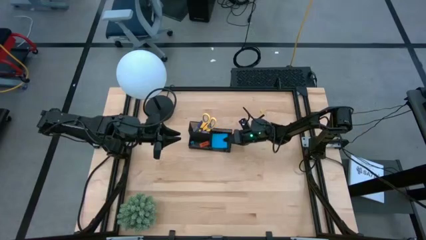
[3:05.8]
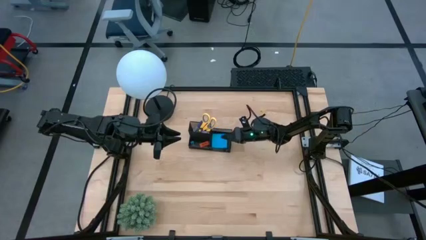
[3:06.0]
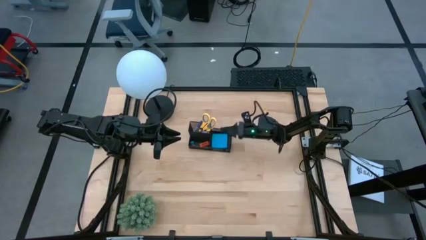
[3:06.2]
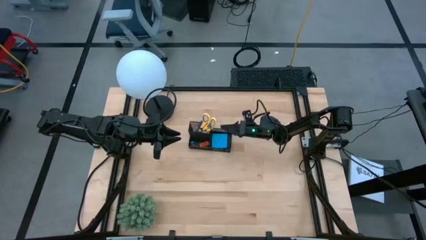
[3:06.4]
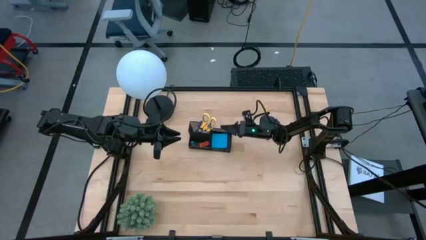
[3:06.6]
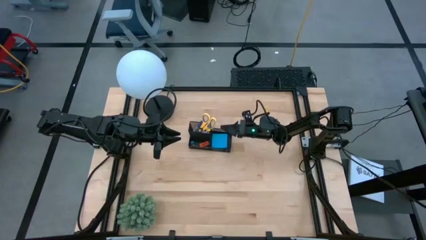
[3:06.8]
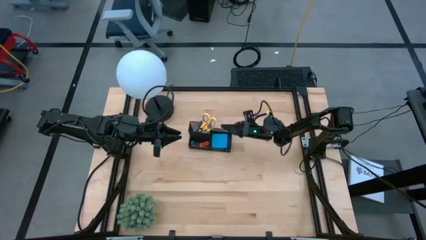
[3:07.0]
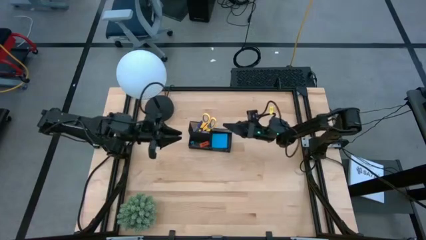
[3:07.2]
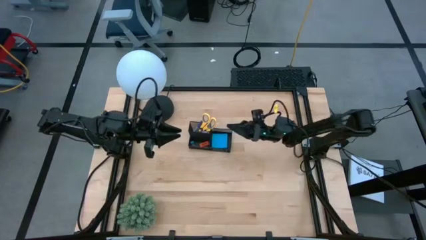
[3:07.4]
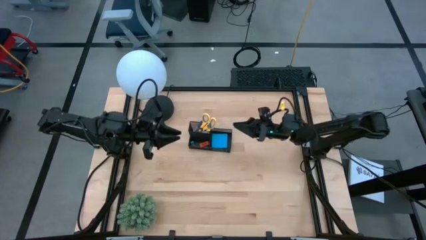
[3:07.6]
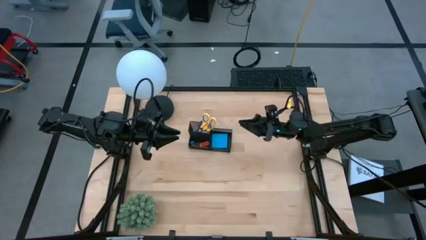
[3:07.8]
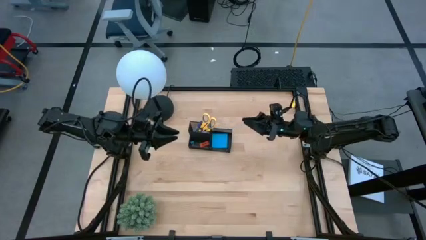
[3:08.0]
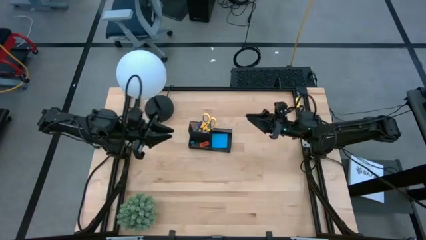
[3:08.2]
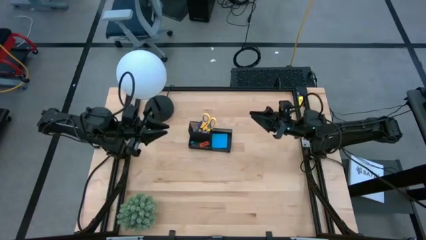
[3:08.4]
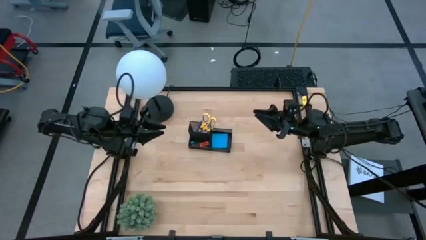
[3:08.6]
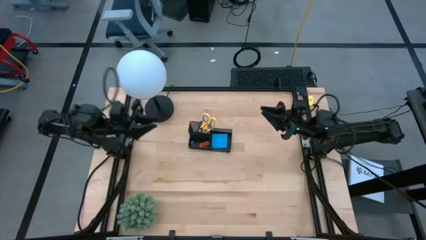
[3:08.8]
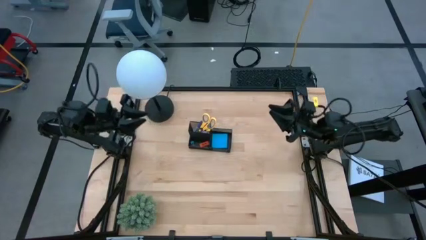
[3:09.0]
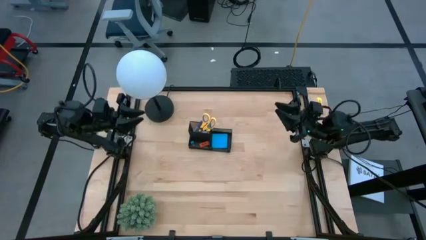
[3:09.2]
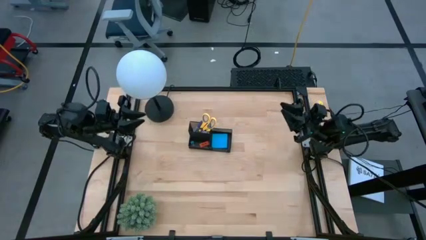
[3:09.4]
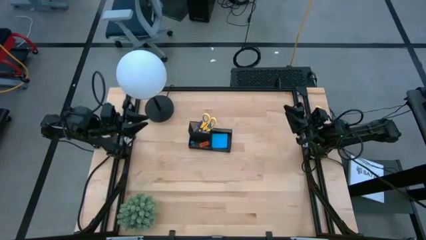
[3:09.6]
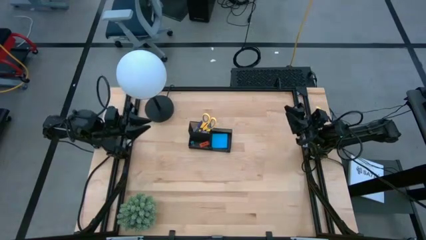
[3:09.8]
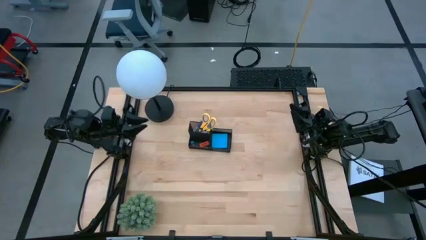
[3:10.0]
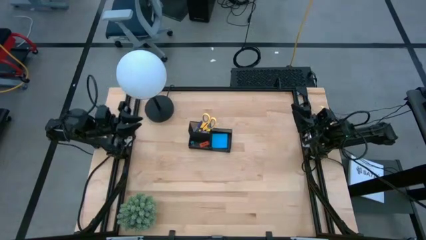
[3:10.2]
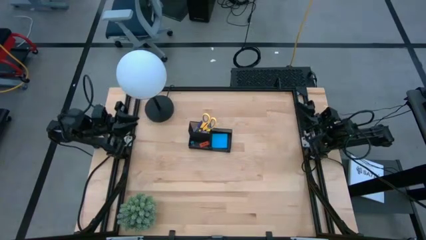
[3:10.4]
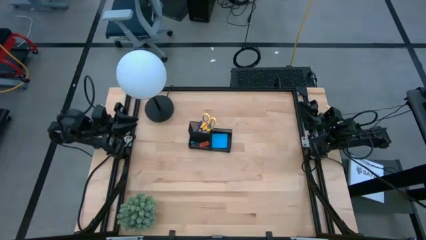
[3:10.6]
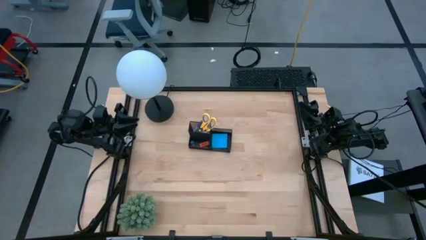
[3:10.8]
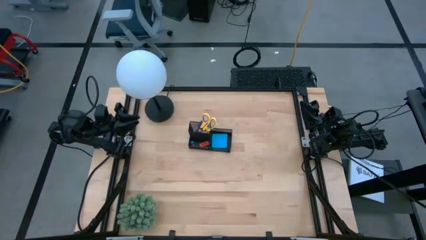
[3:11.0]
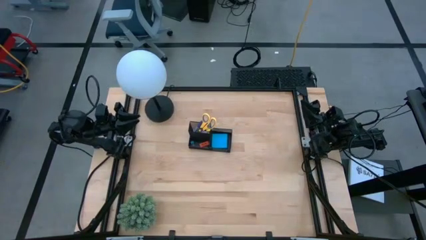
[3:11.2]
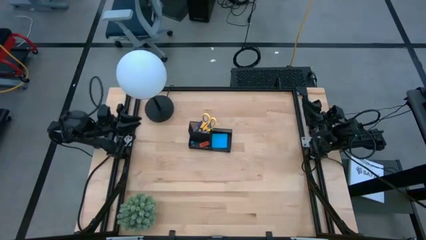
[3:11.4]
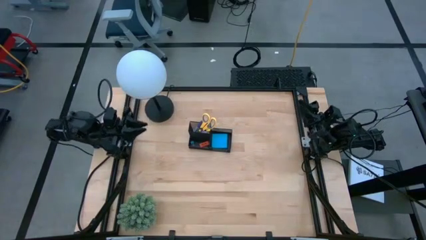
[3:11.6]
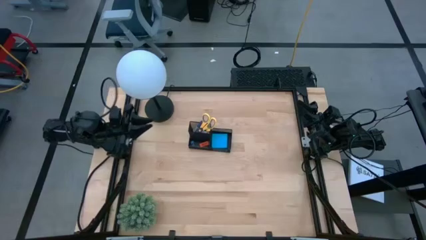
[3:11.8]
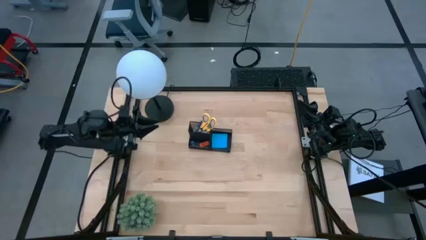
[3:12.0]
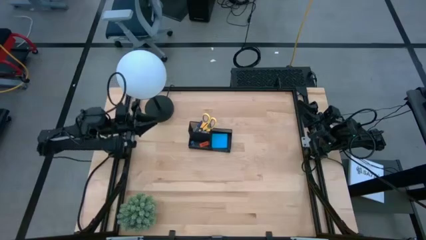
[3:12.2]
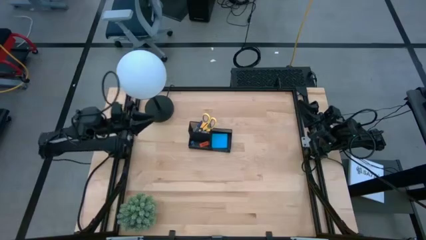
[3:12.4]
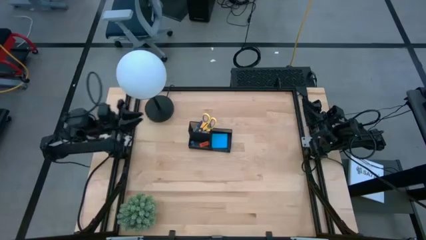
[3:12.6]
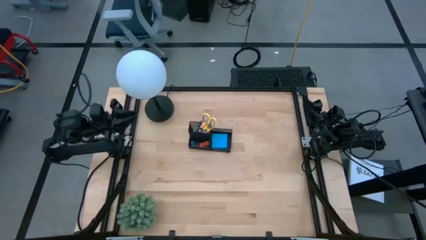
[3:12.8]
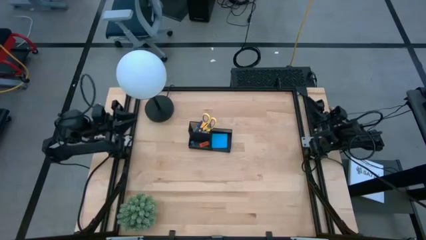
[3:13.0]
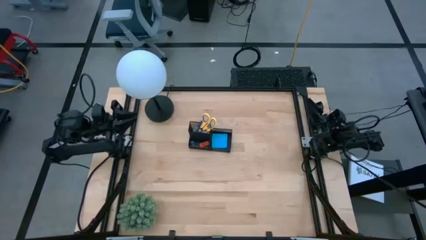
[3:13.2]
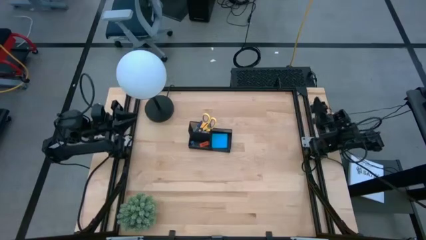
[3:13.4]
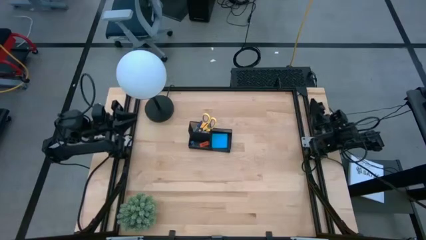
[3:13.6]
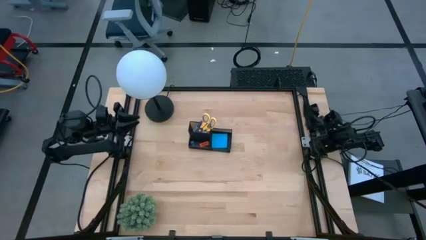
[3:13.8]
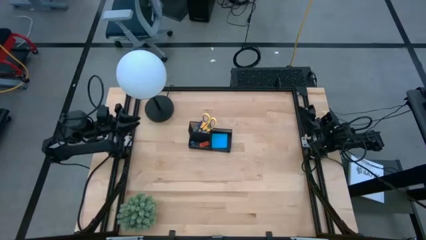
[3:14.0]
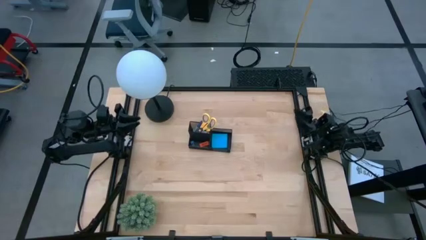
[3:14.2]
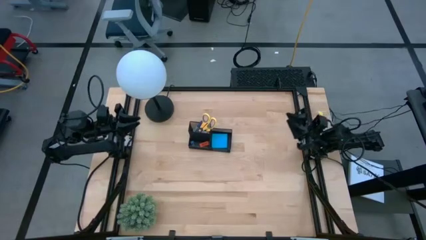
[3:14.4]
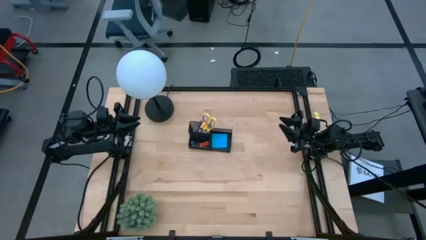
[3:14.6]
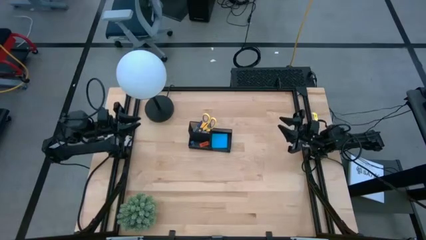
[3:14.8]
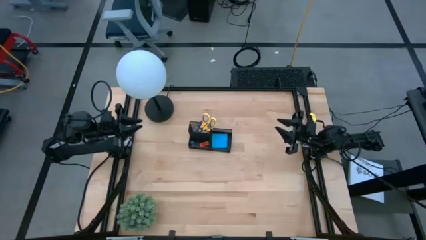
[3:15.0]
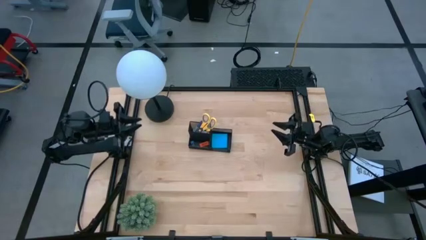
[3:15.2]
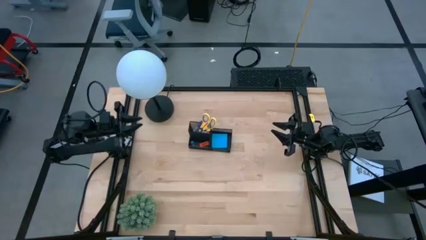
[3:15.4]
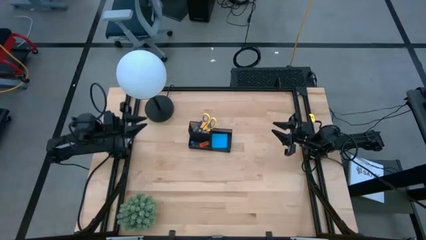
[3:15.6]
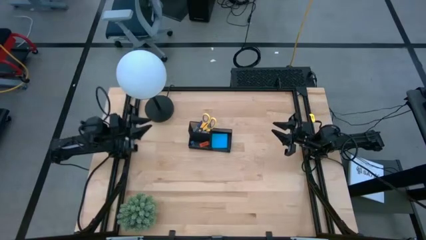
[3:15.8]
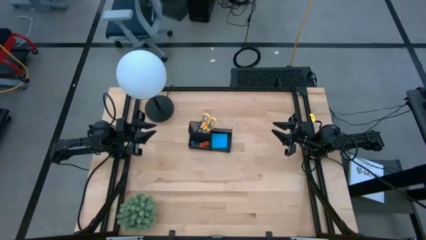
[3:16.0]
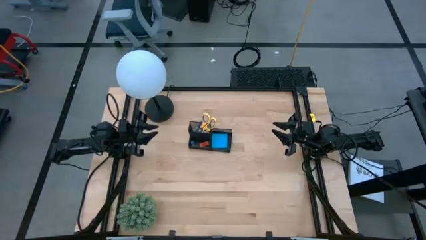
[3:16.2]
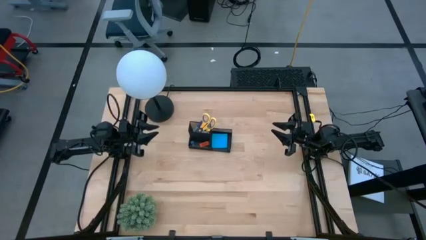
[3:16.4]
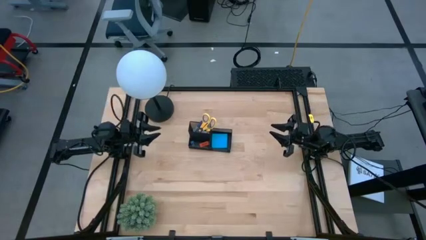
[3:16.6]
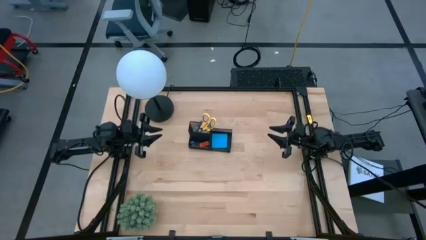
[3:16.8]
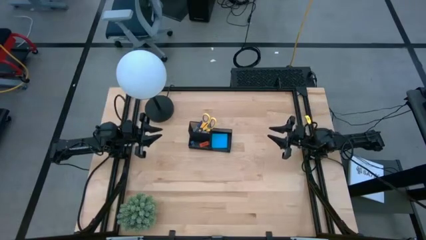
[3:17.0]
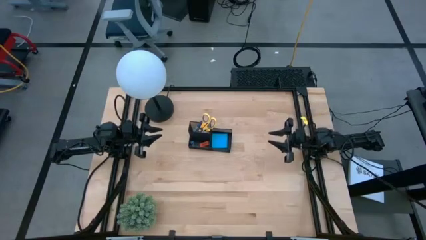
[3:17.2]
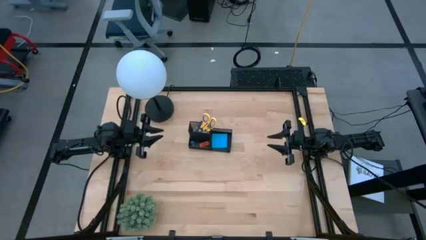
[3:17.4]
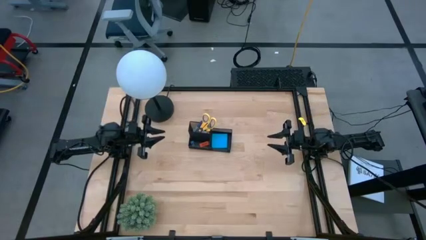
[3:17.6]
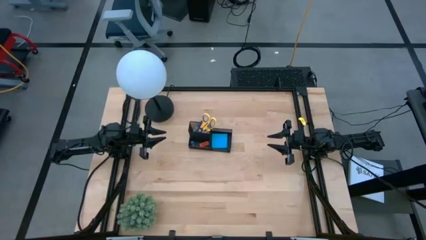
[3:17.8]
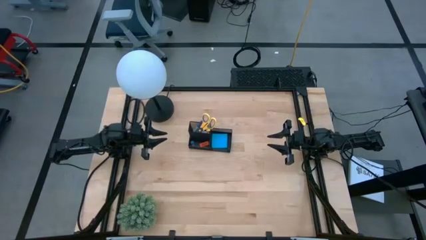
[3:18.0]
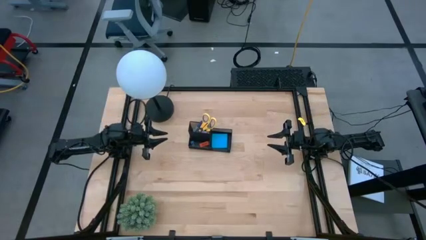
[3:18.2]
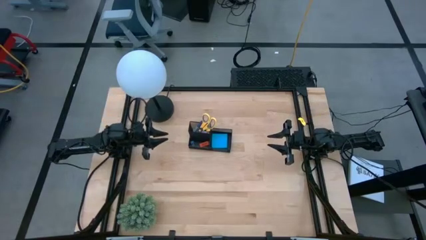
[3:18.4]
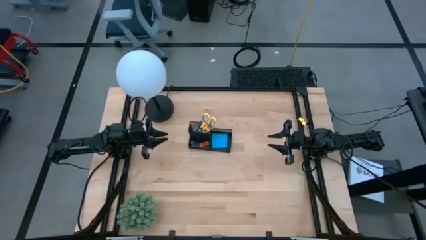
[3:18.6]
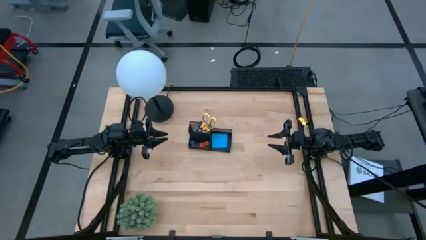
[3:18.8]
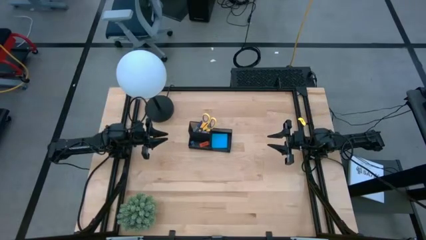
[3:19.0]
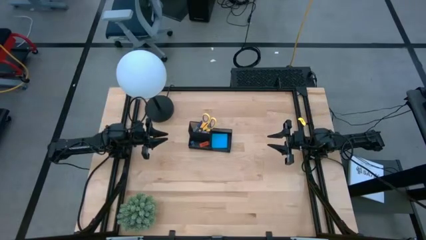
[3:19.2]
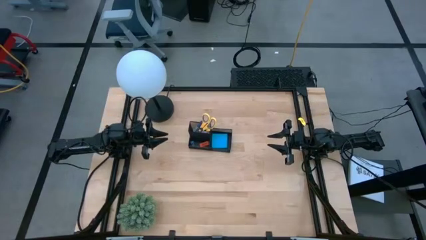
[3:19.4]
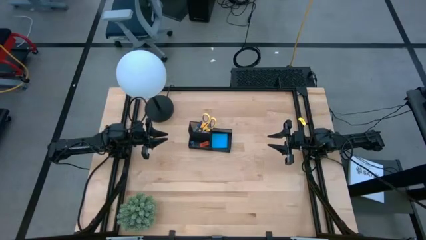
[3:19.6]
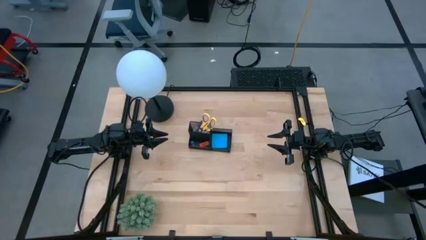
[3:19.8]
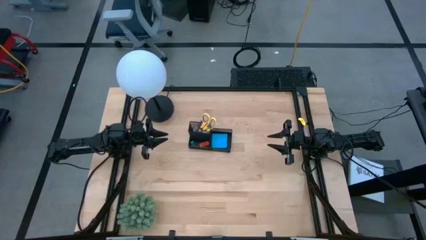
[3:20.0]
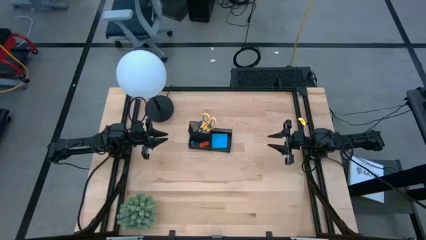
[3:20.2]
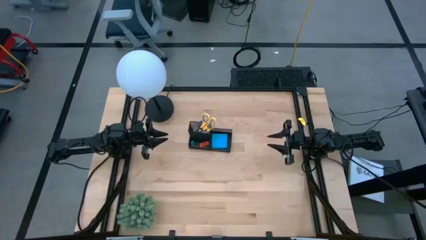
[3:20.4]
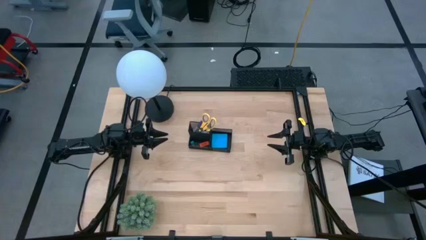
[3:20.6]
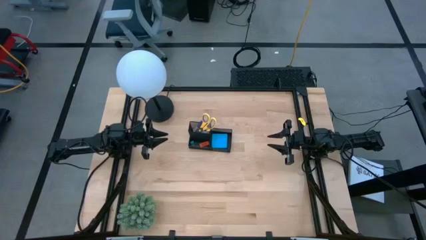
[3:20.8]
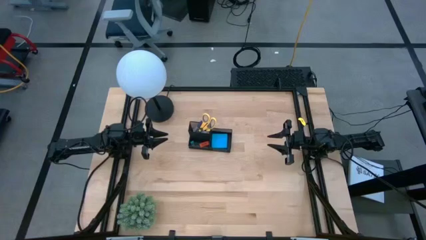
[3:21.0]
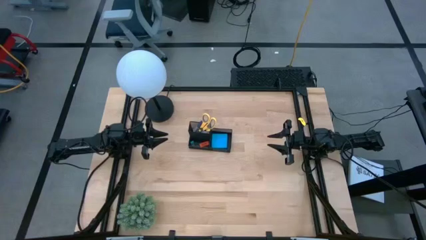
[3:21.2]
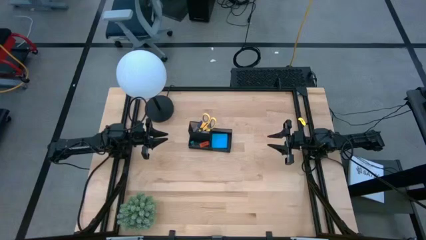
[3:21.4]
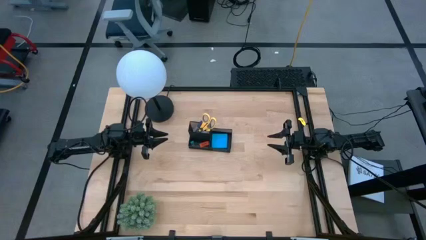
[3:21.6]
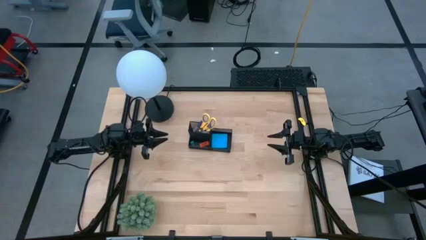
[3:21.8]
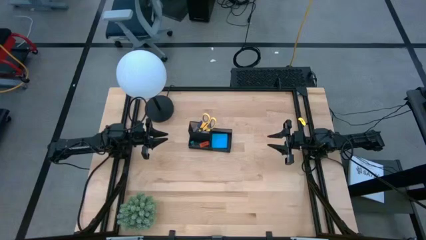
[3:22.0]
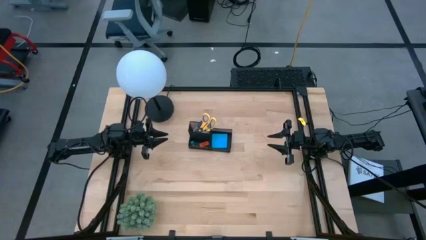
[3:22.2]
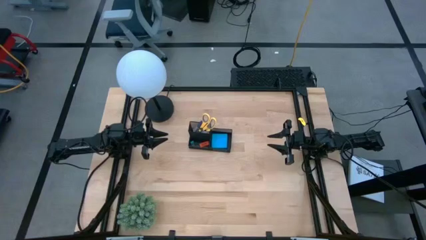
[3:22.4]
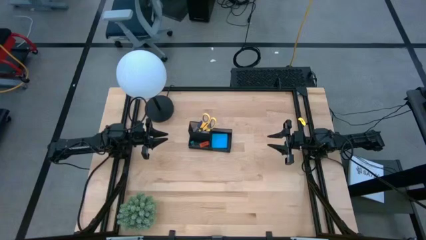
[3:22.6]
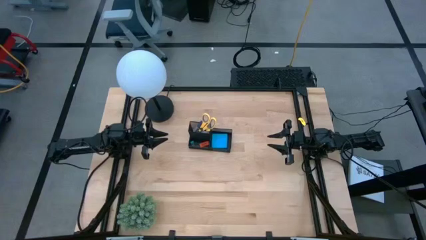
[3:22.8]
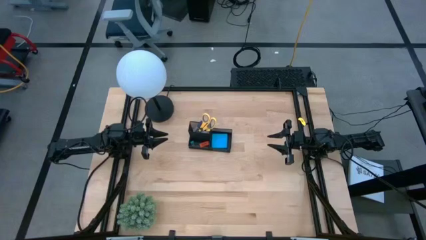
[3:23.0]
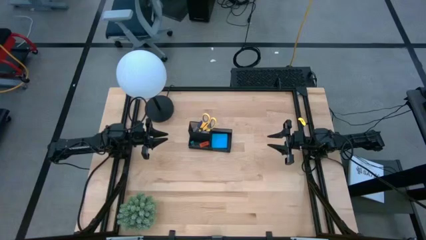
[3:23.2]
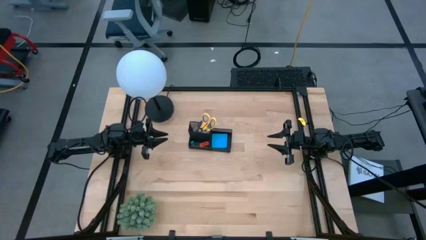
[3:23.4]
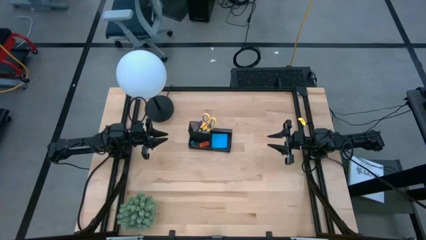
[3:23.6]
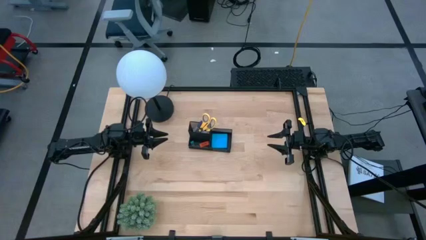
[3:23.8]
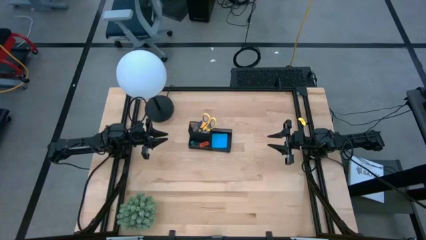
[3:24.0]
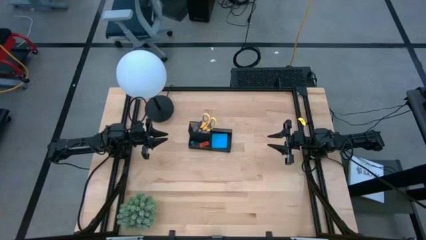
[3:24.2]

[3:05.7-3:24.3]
Task: Pick and place office supplies into organizer
Return to Home Position
